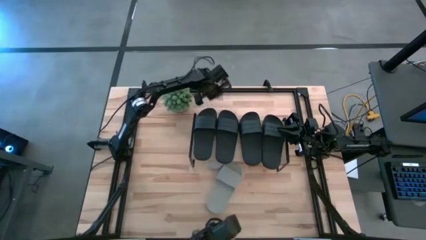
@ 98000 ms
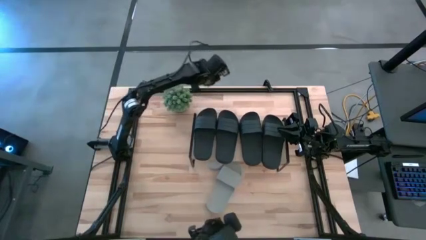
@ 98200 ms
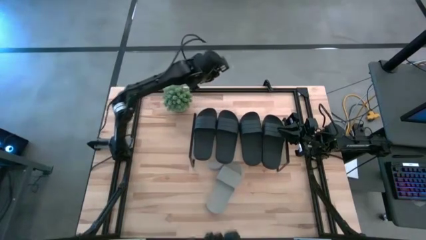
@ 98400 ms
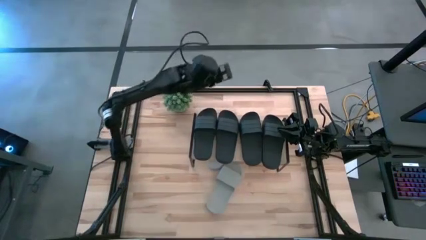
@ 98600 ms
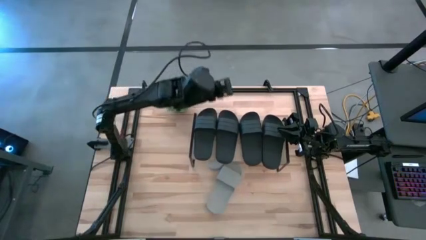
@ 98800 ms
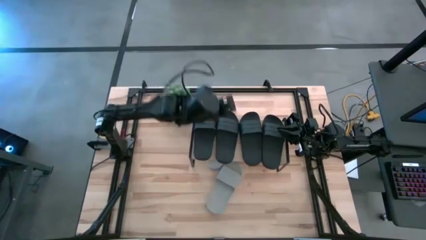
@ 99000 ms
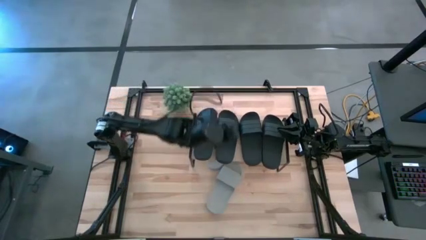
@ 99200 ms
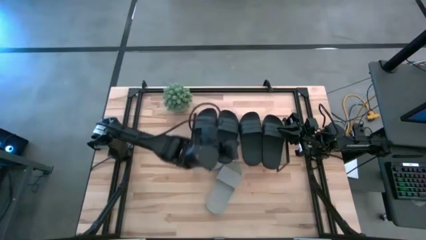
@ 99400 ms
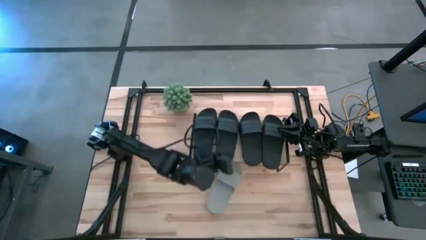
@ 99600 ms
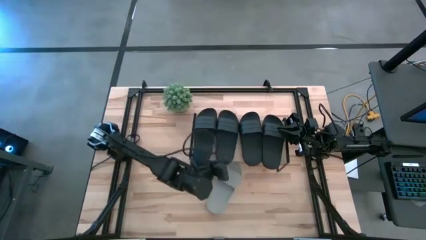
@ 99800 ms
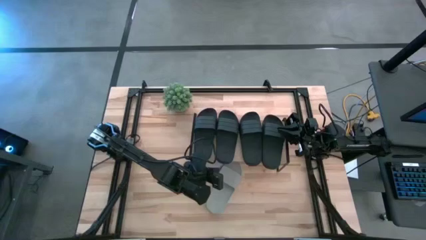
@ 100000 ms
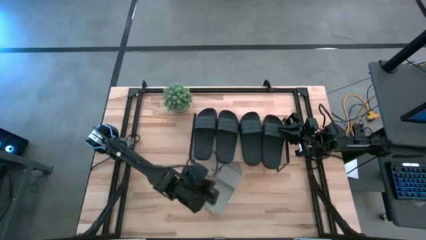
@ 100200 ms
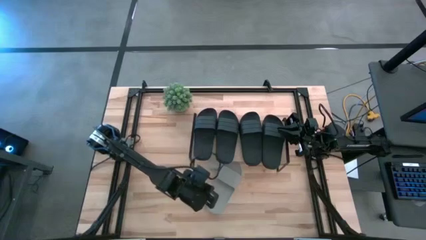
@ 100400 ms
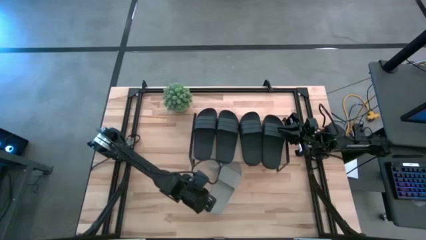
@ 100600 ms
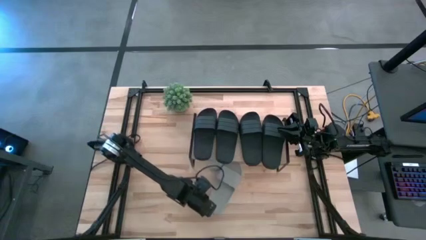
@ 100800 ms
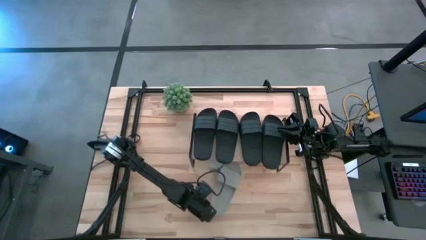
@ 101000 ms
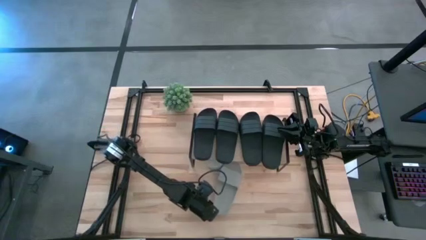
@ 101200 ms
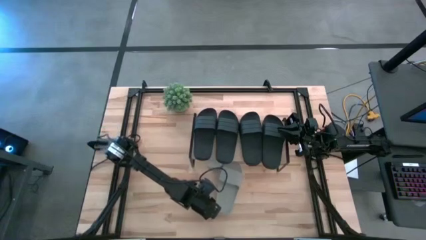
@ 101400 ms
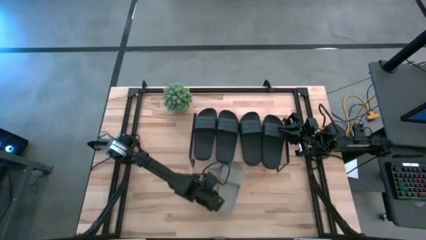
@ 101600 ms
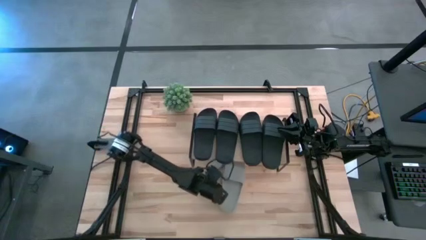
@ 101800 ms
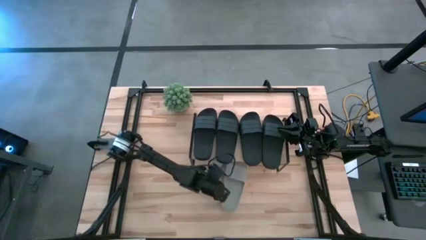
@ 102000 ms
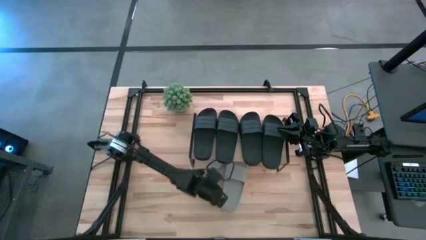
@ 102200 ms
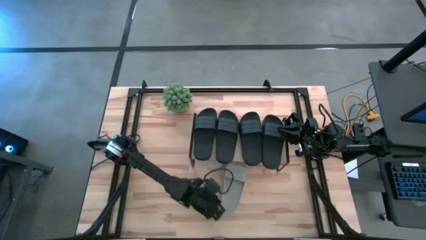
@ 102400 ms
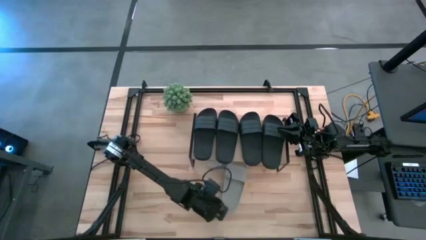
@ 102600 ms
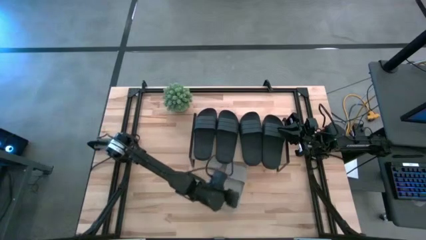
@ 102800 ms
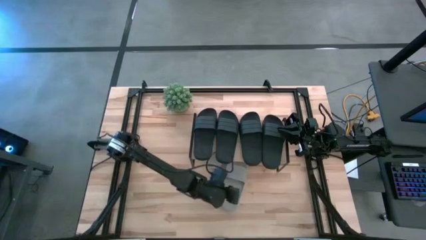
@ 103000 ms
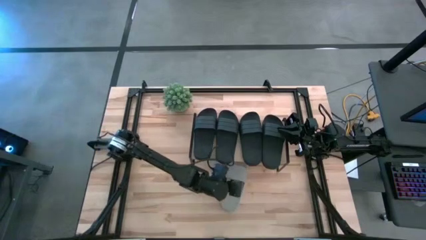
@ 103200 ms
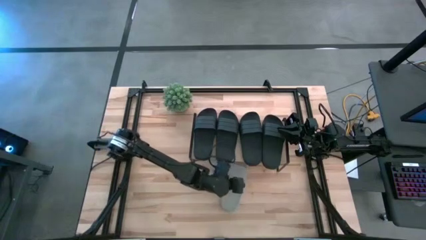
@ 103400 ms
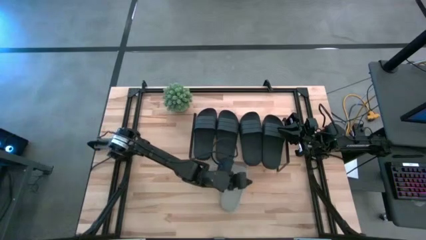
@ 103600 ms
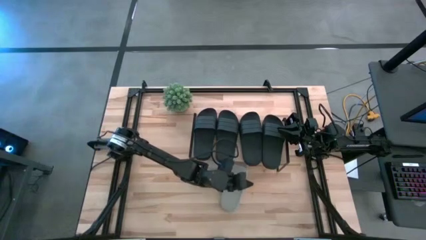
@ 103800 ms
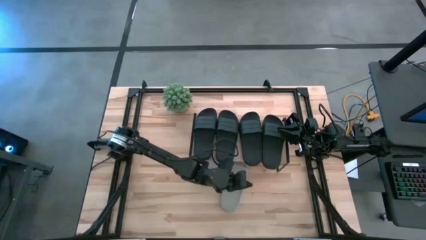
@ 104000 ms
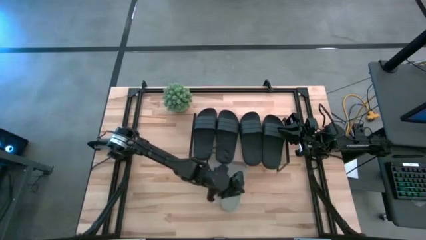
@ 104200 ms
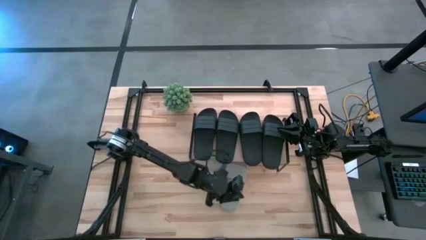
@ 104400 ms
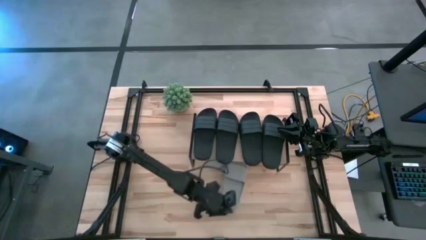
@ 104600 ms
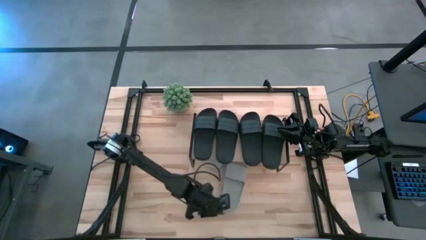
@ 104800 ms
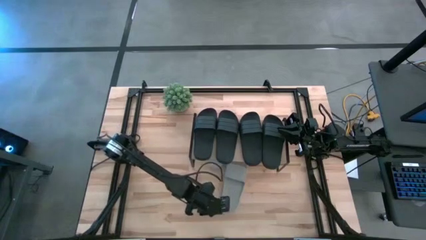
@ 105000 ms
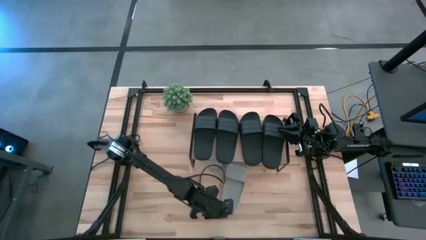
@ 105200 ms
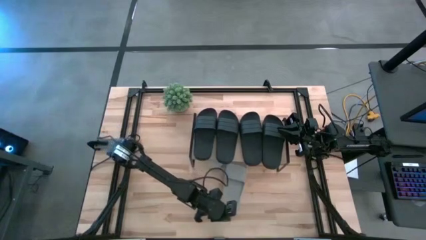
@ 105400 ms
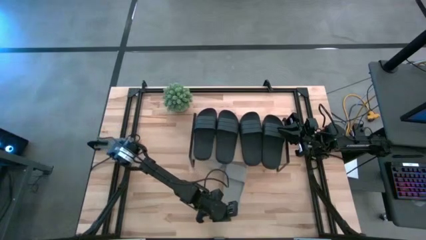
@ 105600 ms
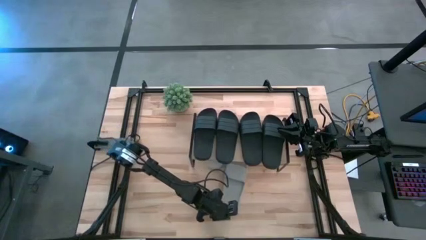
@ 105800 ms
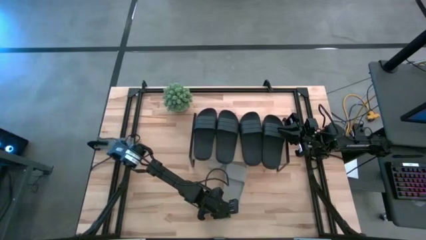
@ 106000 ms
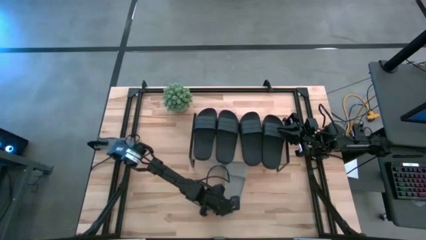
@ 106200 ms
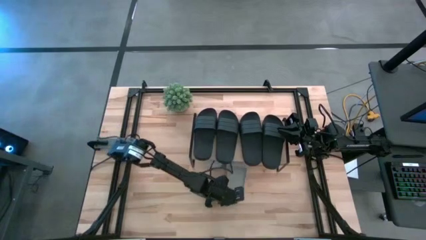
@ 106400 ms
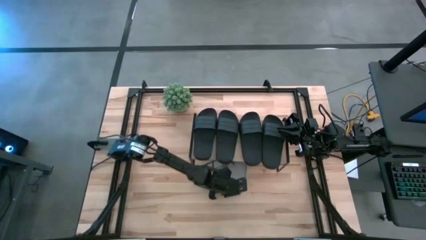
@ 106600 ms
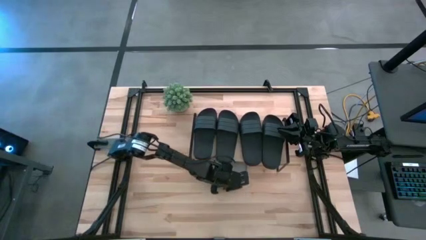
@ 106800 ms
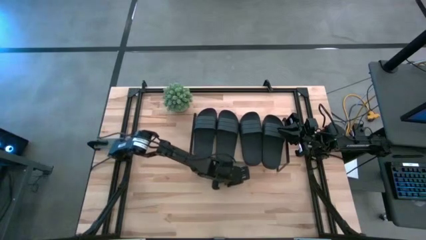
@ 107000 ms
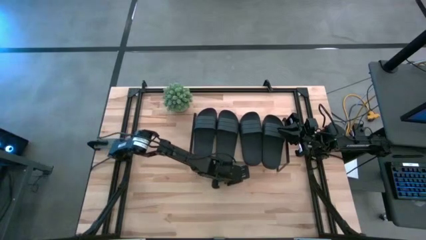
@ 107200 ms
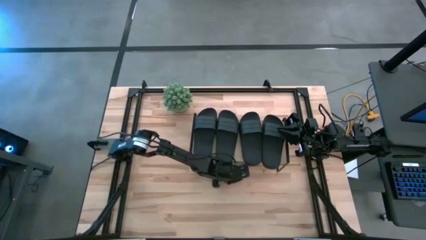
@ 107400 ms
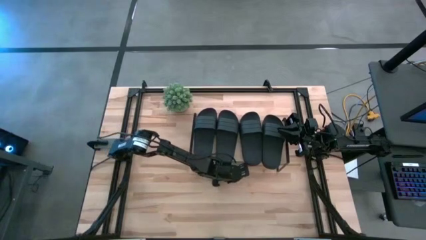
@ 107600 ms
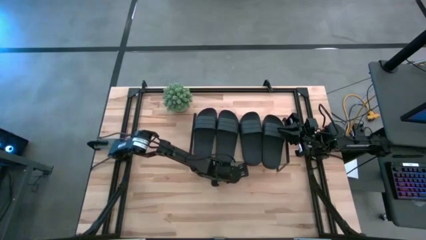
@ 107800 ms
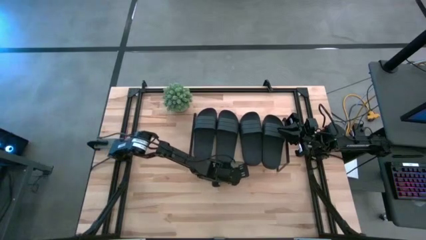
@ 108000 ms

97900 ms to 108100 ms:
Task: Pick and place slides into the shelf
Adjust the gray slipper below the shelf

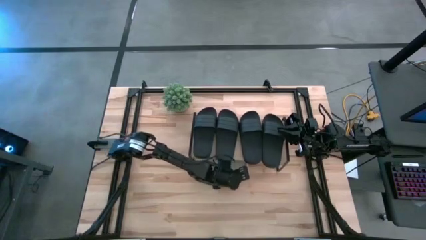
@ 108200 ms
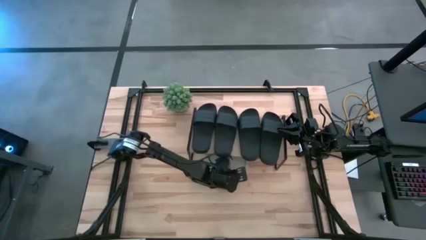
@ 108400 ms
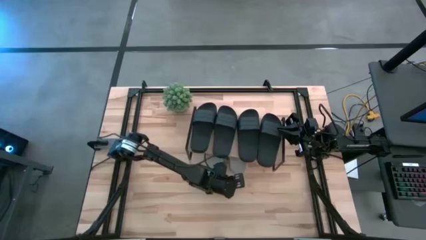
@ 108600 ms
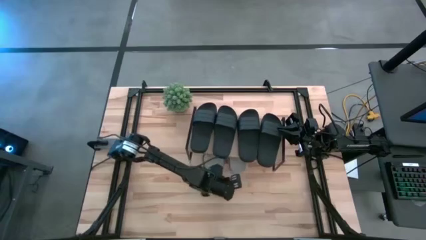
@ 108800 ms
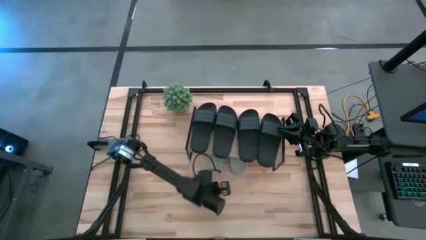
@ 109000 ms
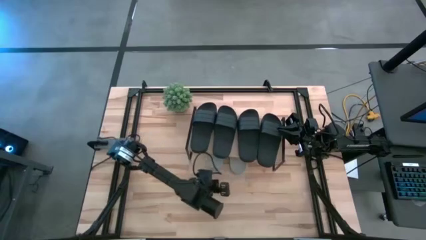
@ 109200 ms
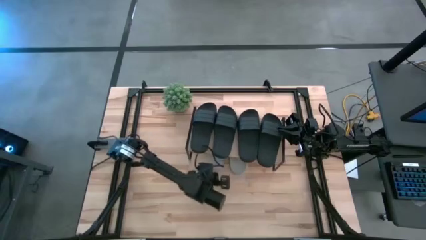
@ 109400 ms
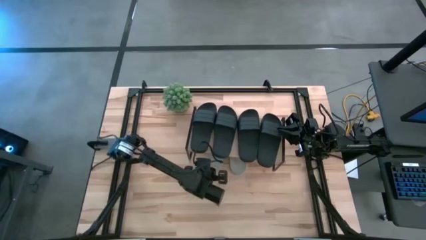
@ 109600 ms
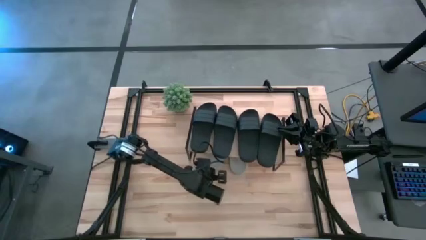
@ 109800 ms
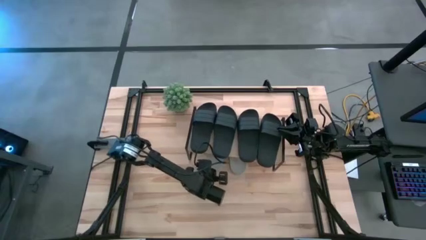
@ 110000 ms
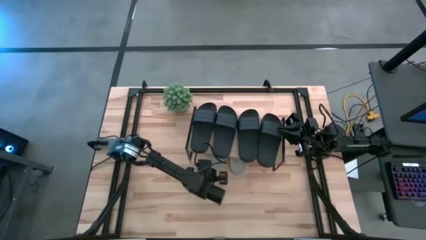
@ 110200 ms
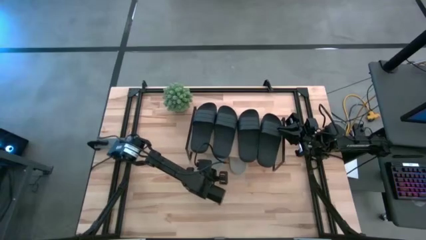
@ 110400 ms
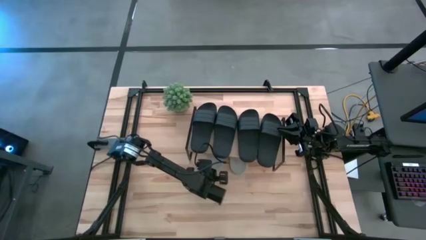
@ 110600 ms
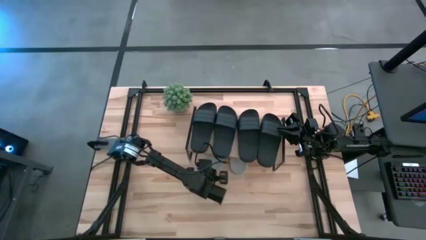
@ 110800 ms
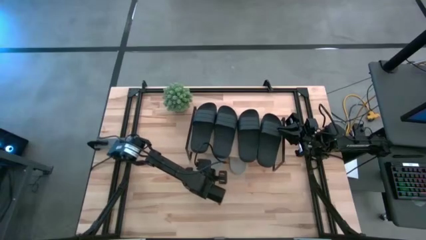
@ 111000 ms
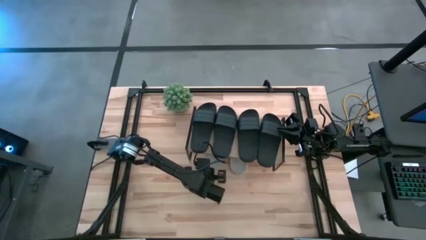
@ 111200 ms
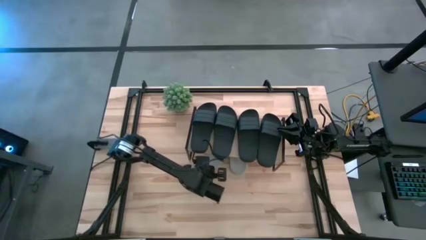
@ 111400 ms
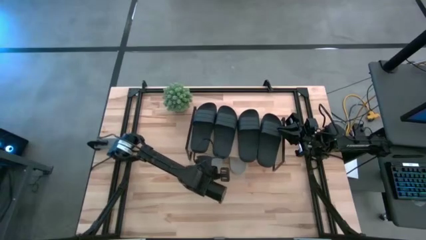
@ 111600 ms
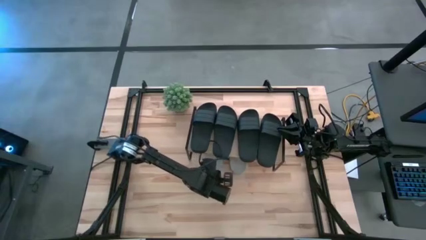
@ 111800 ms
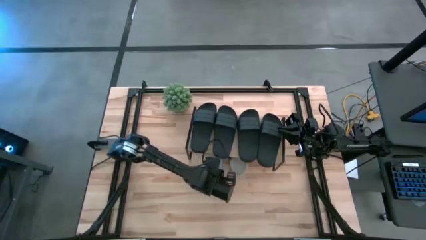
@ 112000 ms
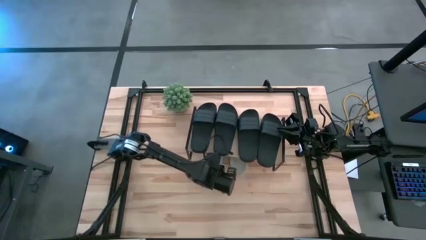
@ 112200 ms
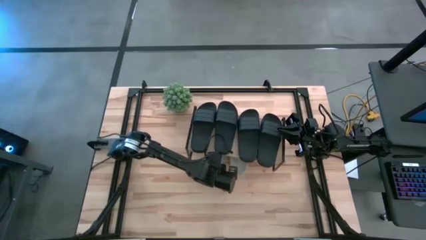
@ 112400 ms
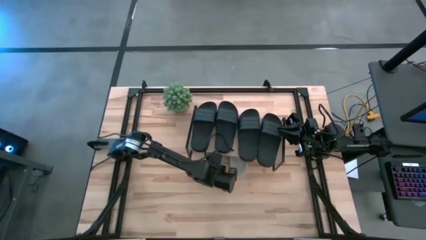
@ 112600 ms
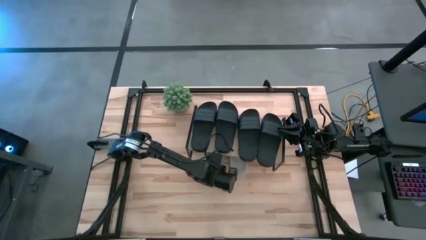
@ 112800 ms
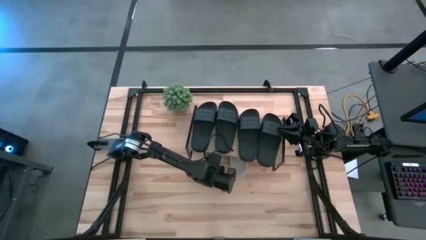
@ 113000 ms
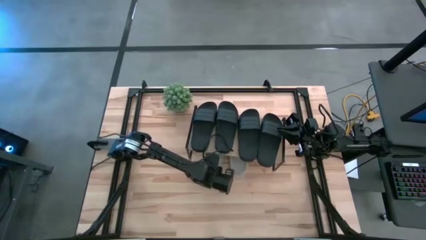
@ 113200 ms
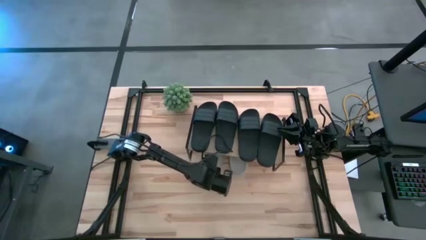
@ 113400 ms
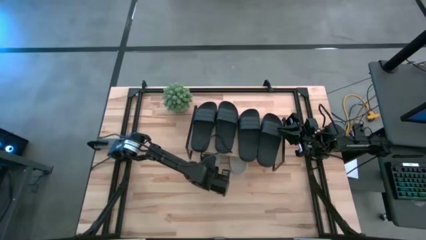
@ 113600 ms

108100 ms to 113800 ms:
Adjust the gray slipper below the shelf

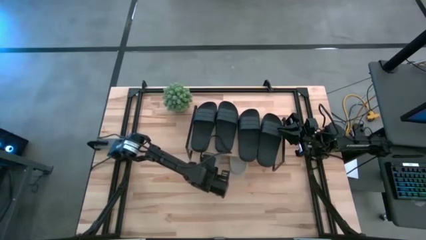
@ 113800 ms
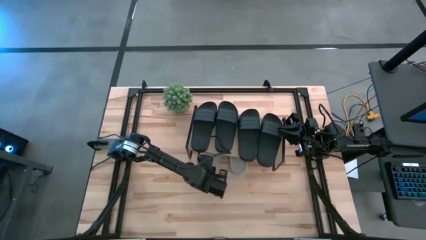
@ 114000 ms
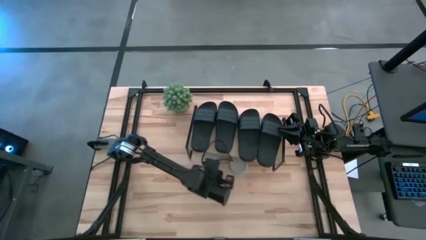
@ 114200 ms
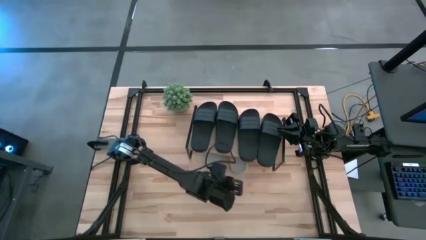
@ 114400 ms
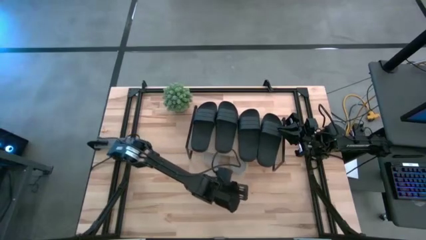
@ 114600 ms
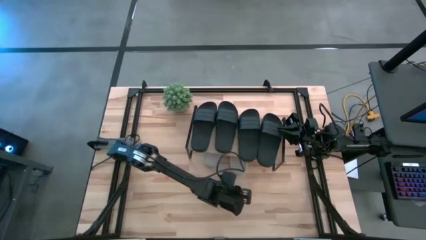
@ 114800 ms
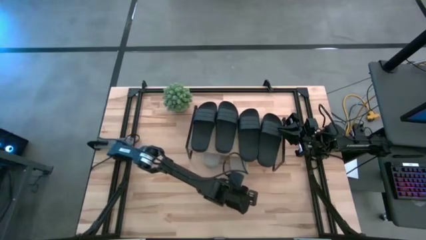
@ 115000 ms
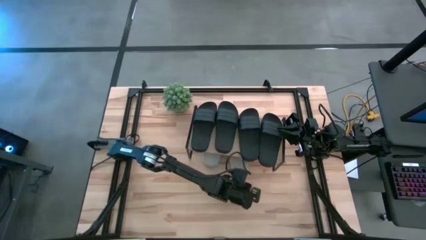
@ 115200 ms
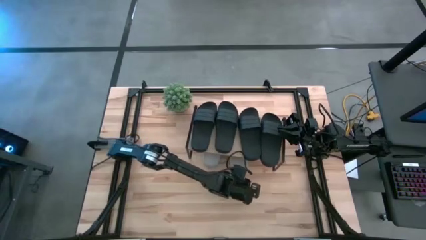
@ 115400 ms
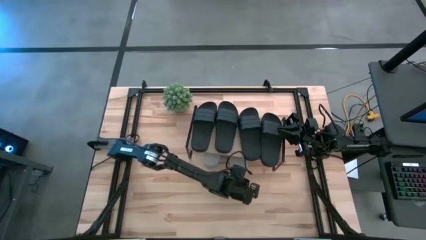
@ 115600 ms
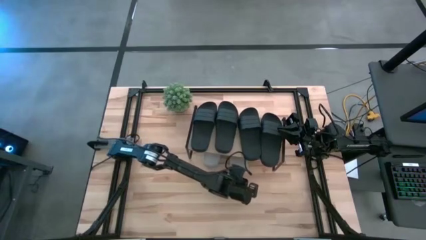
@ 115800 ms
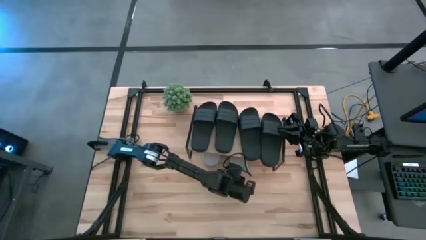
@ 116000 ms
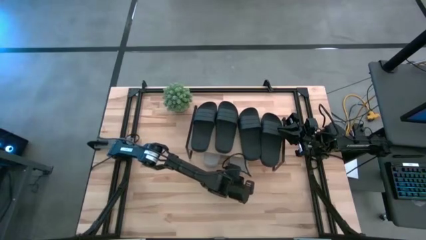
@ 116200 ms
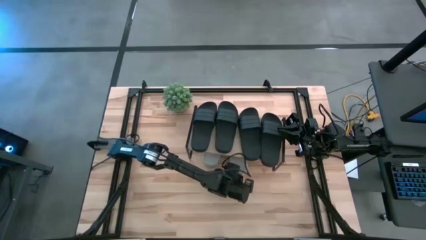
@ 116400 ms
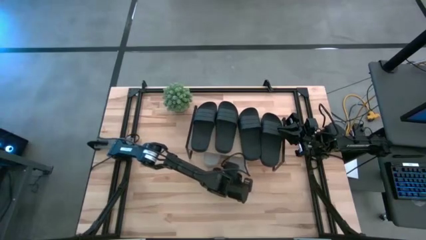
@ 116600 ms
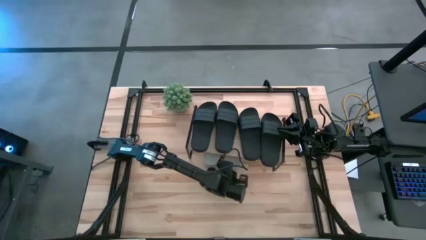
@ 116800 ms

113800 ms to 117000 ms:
Adjust the gray slipper below the shelf
